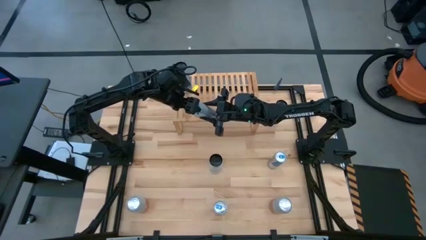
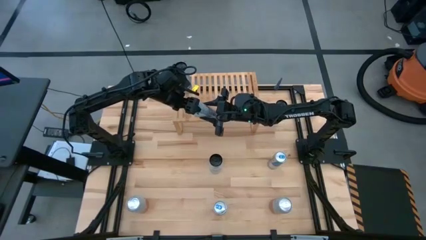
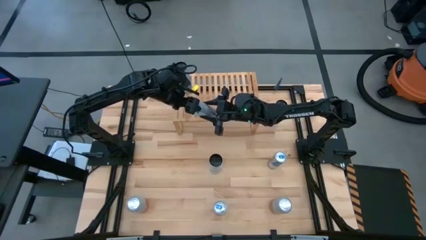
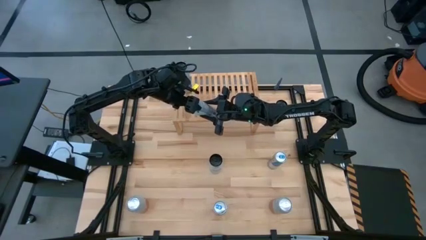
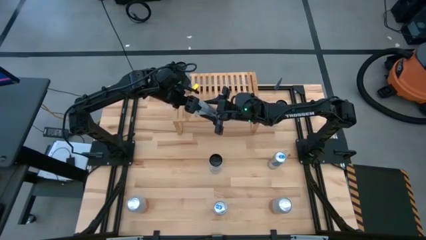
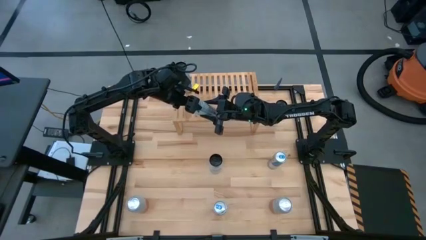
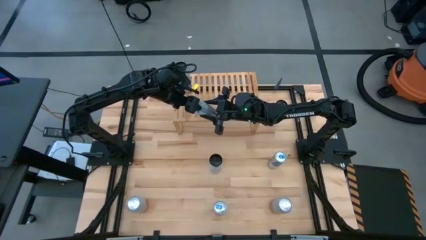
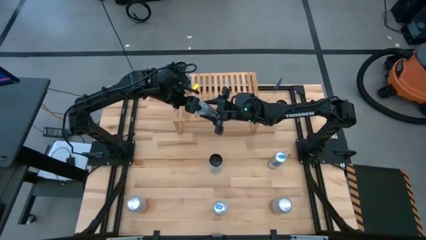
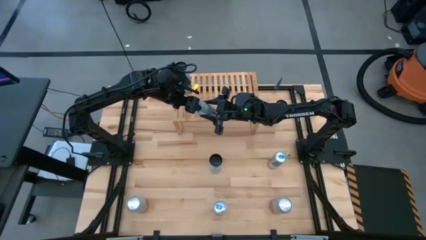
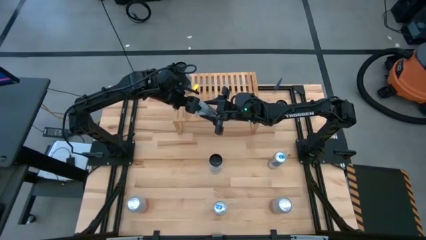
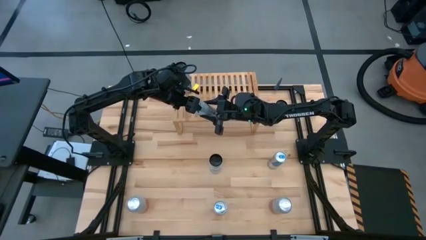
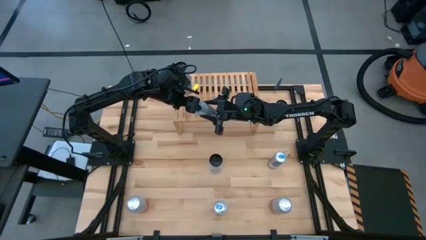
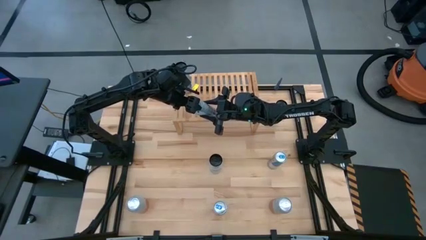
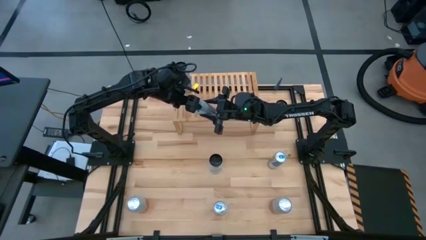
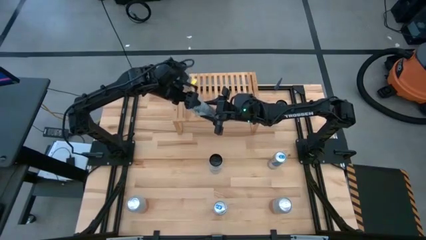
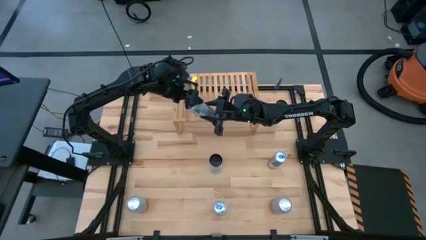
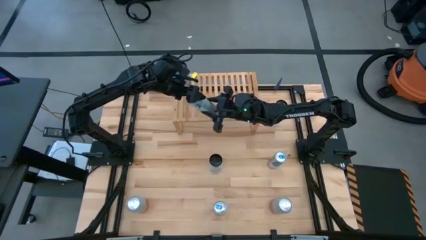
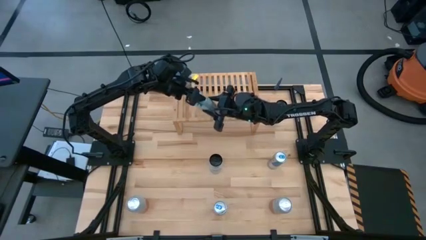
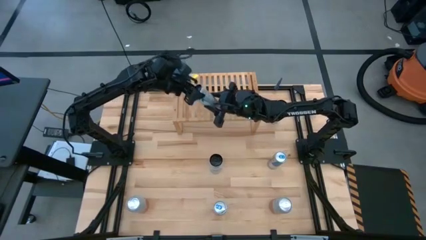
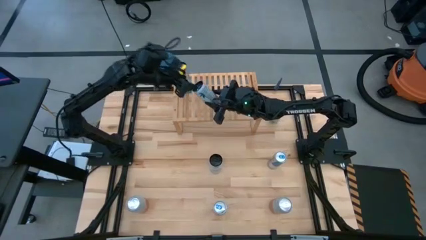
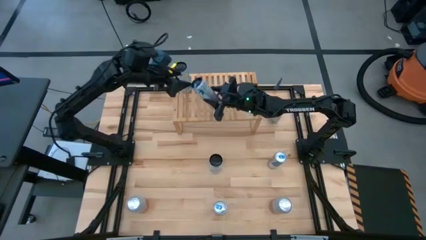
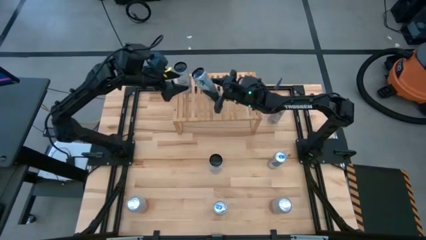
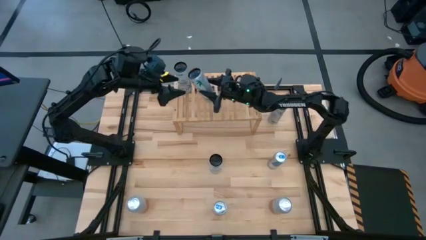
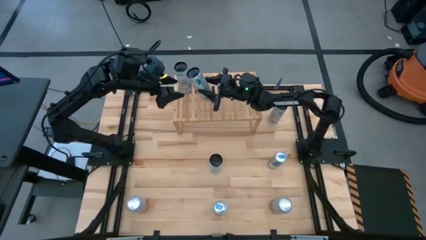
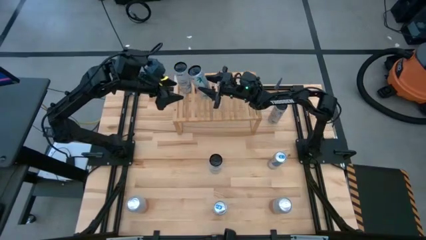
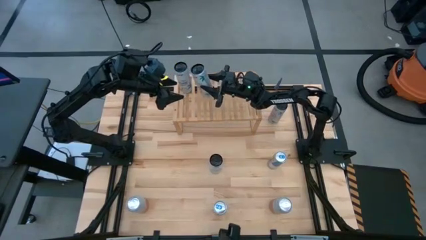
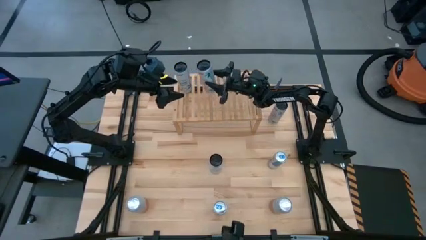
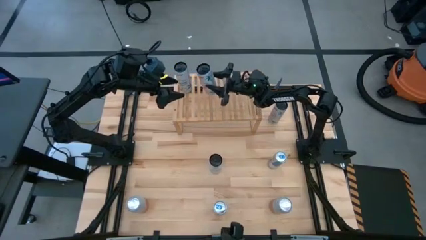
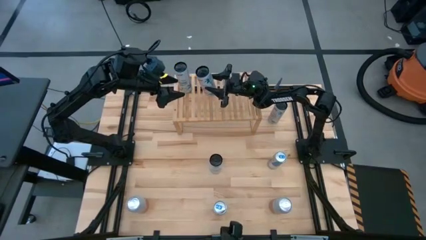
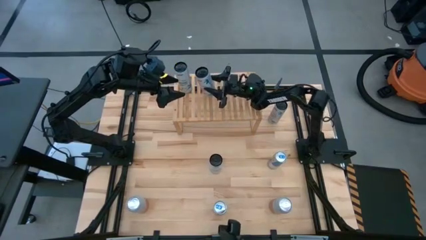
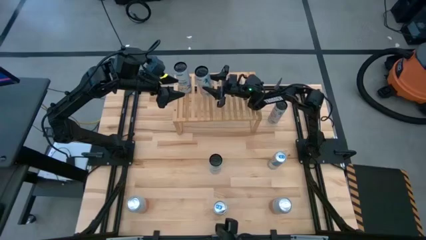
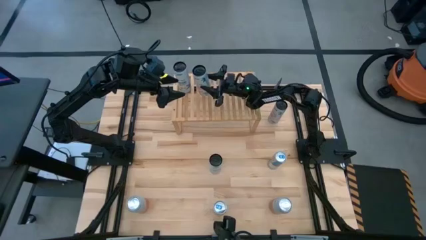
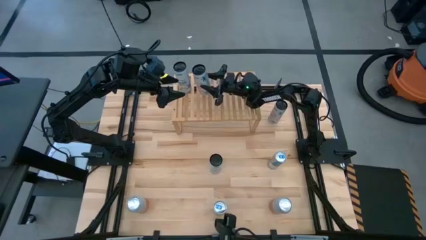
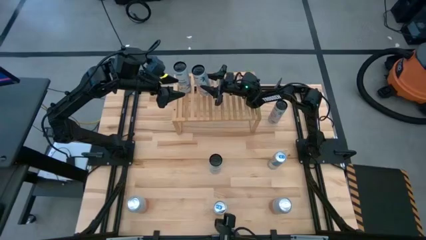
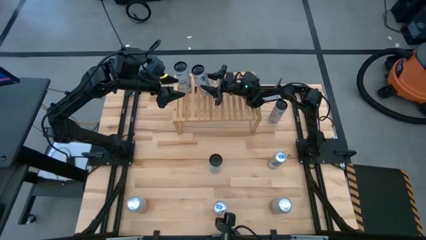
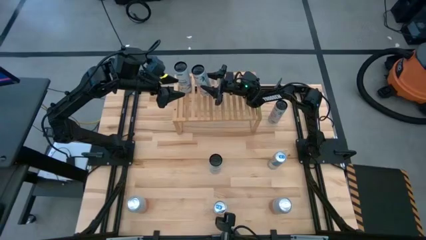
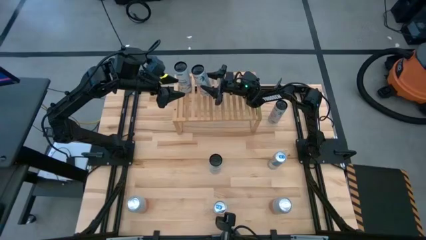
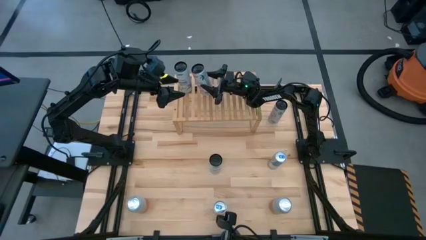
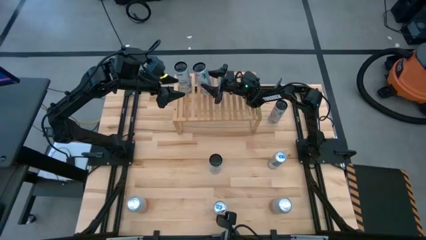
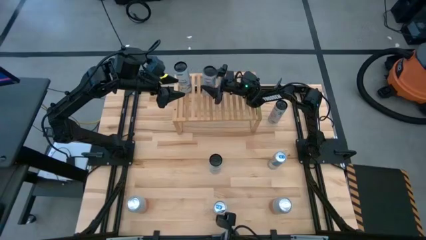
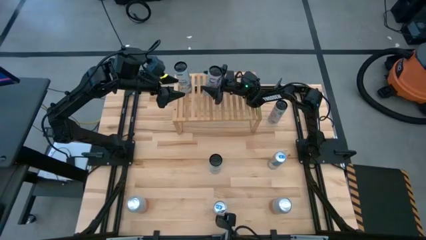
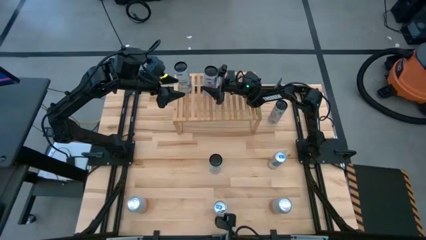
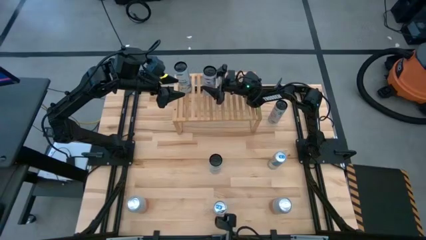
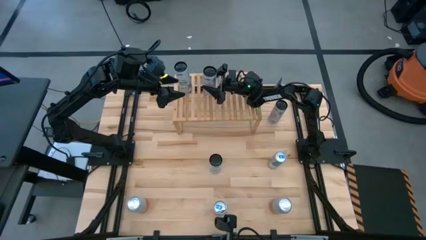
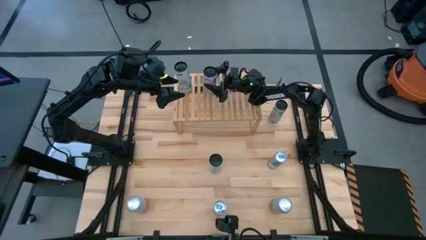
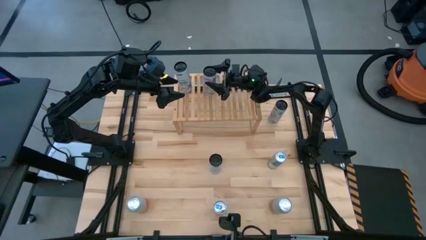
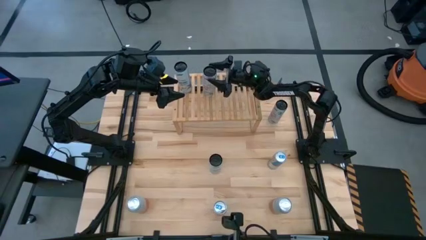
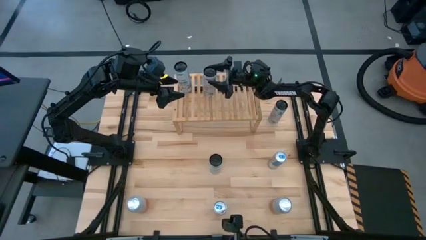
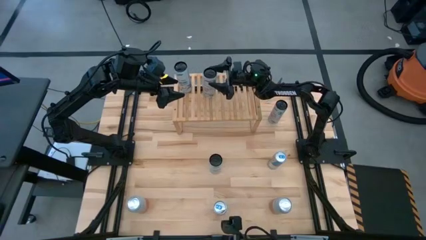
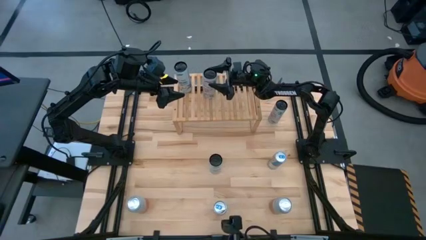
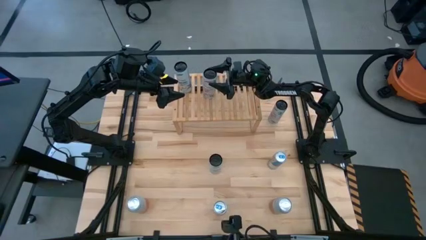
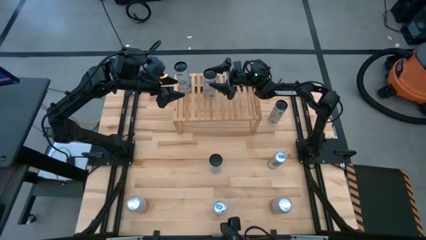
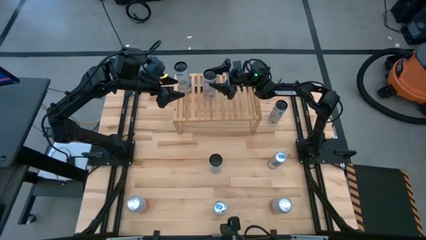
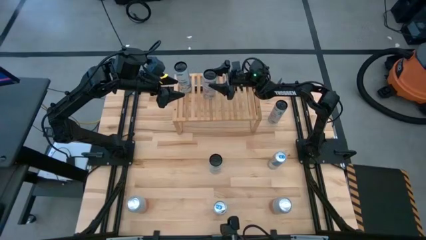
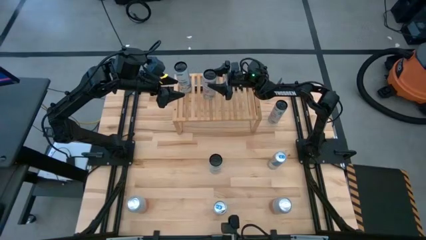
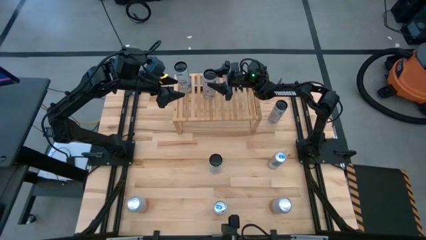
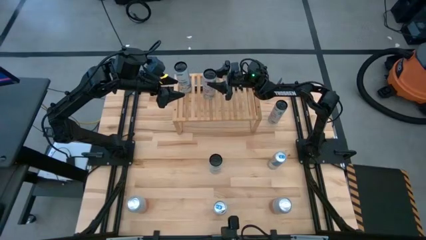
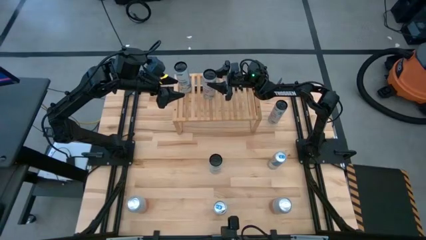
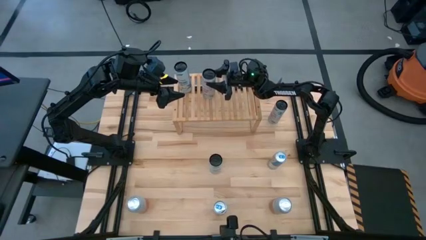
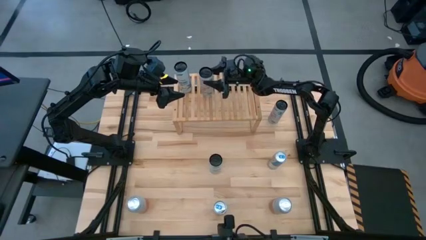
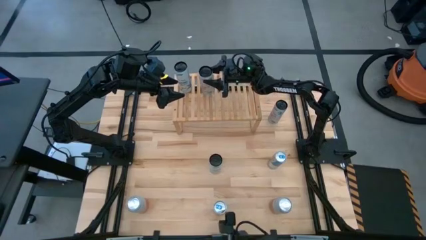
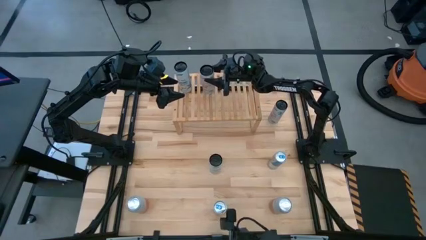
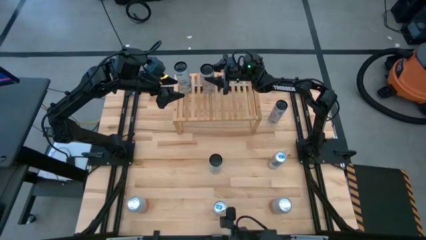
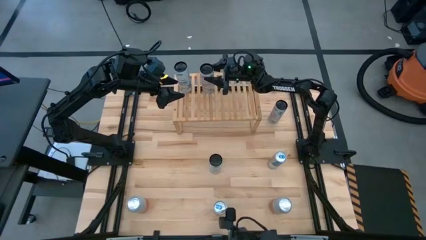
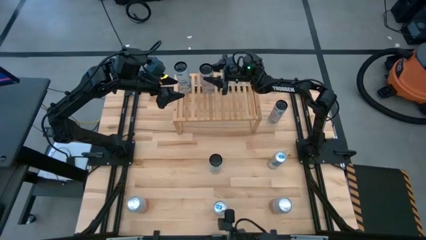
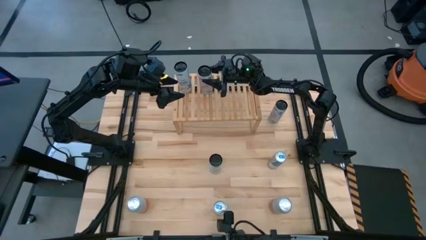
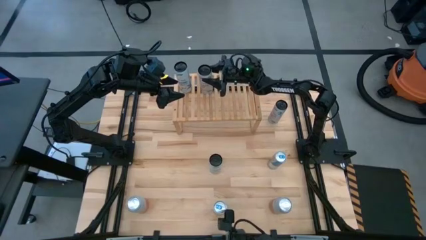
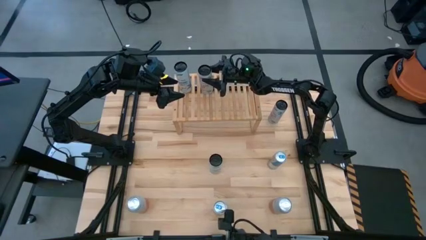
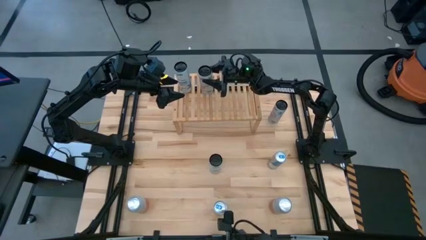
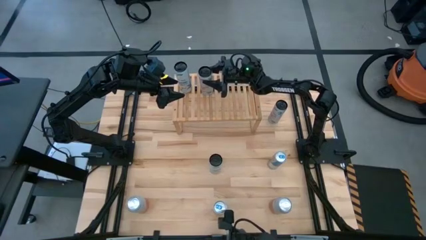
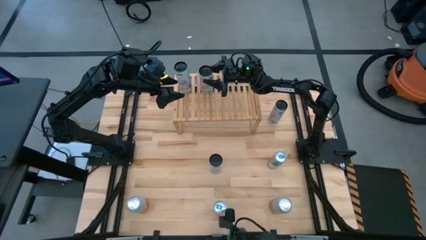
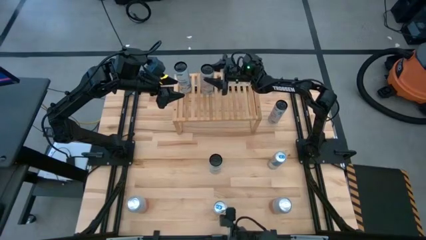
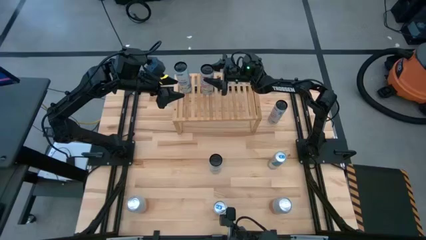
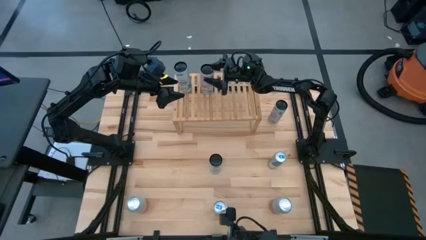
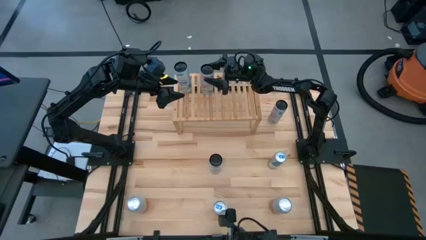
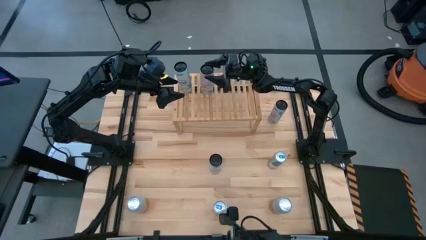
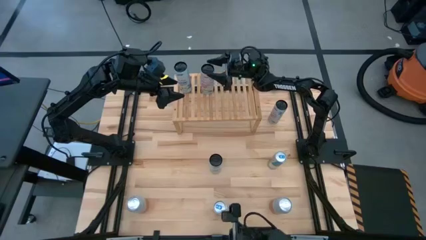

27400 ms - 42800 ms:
Task: Place canned beverage on shelf
Put the white-pink soda can on the shelf aligned with the other white-pink soda can
